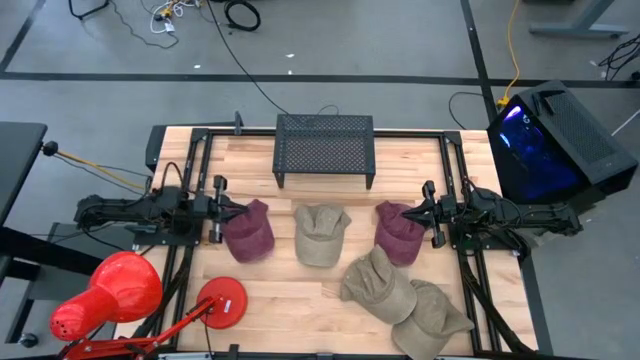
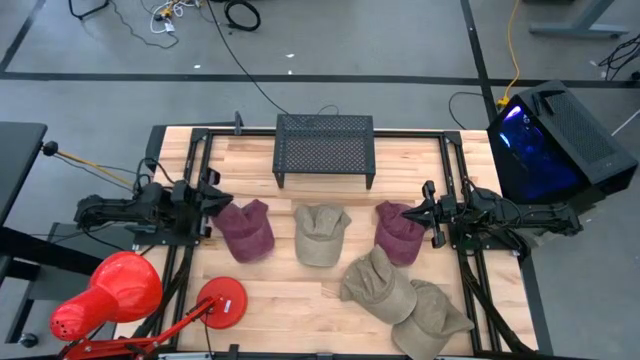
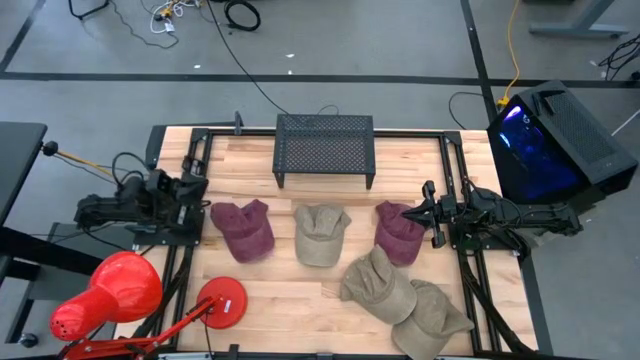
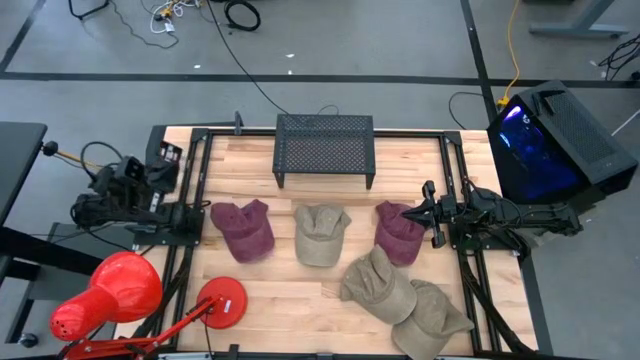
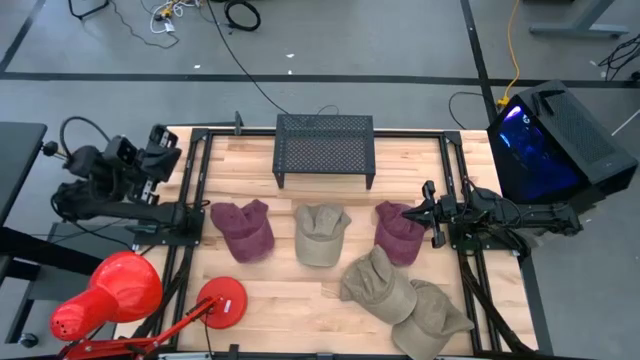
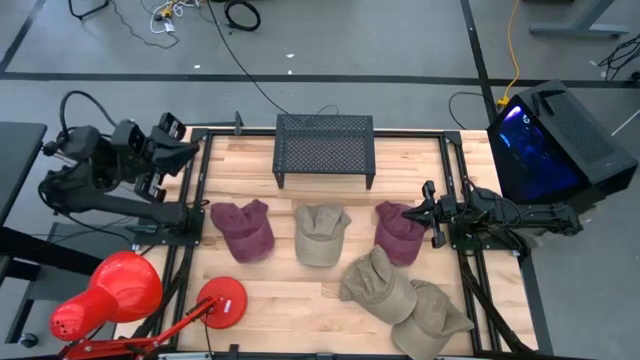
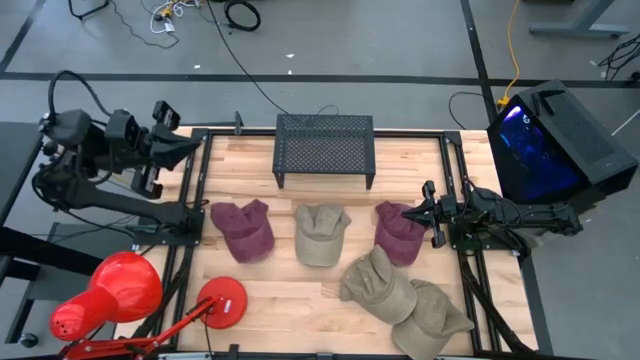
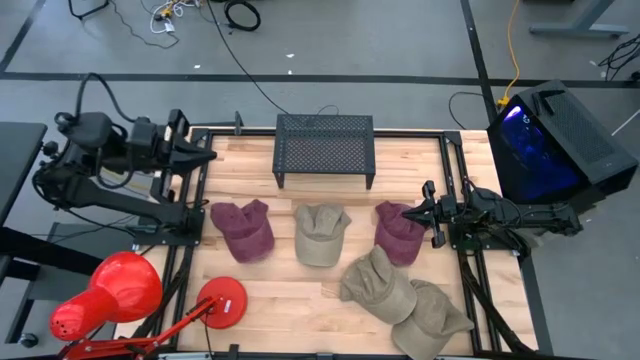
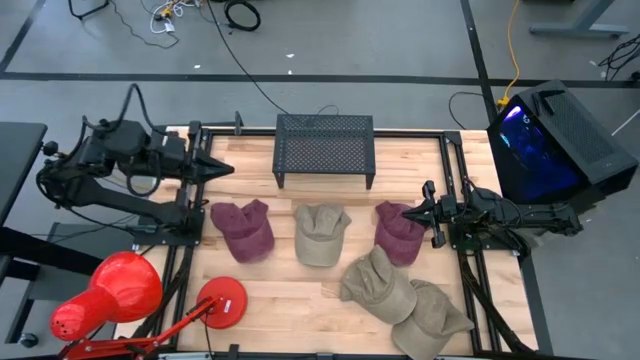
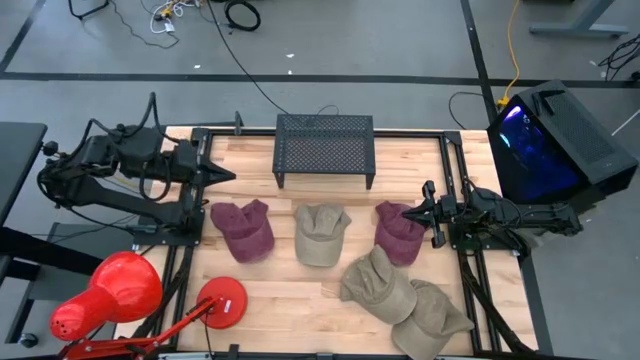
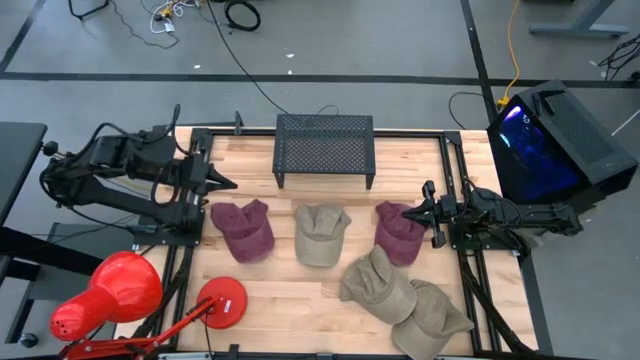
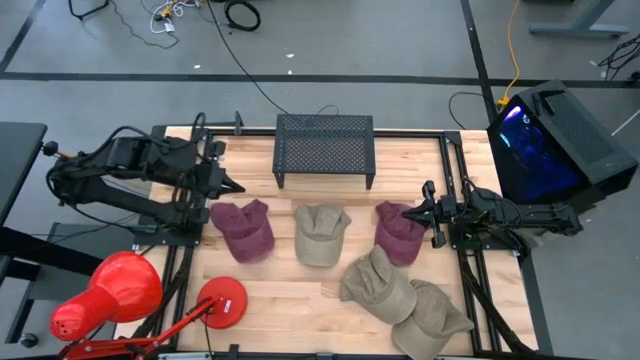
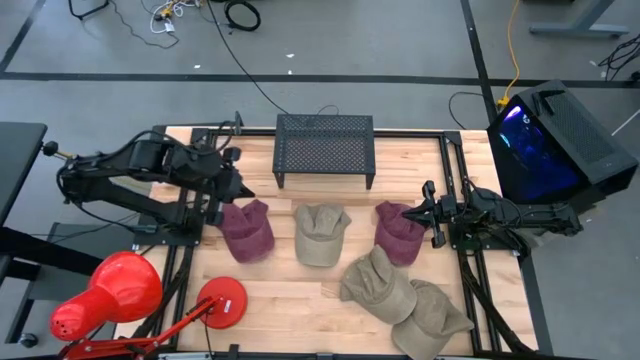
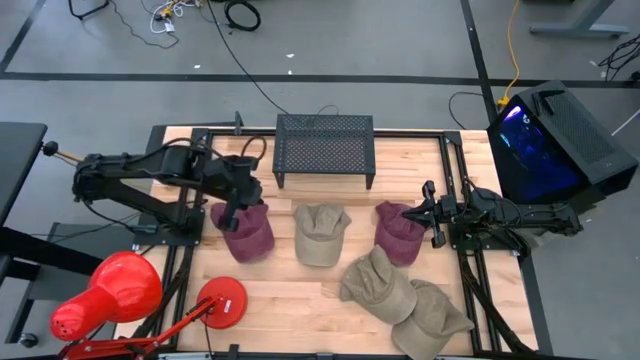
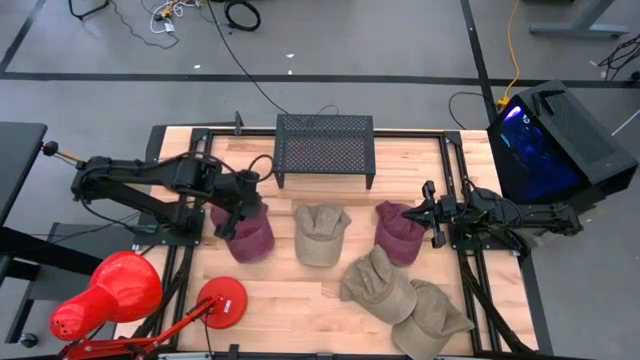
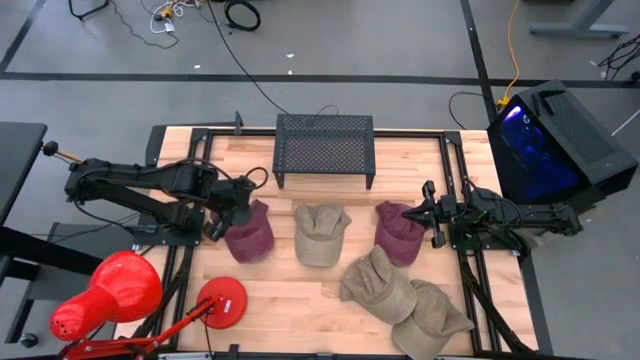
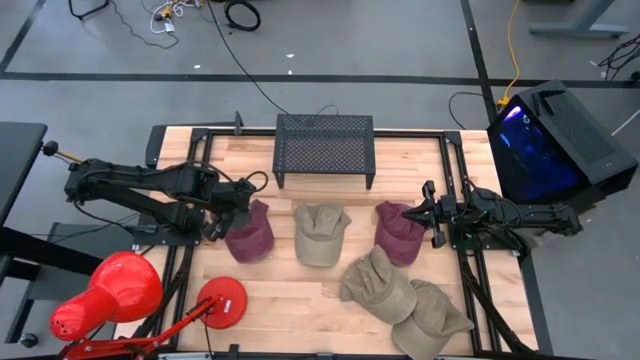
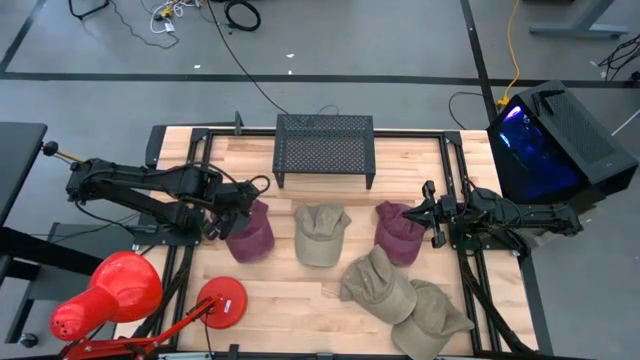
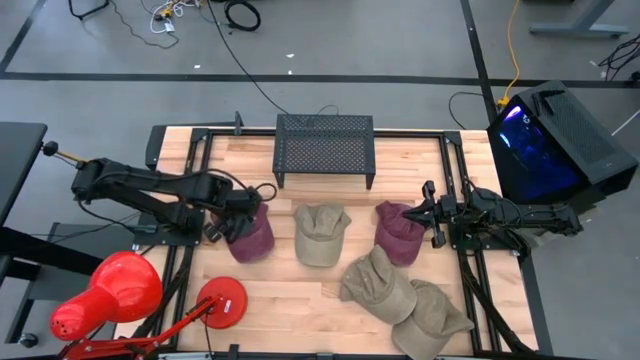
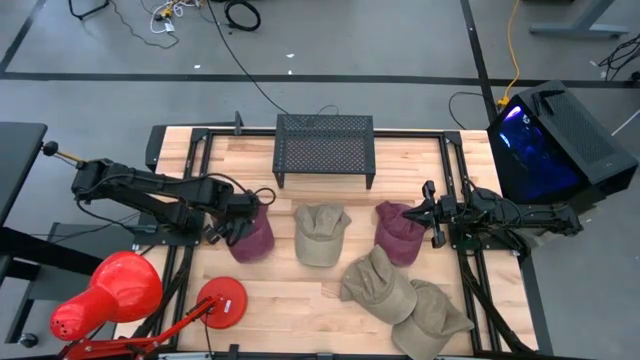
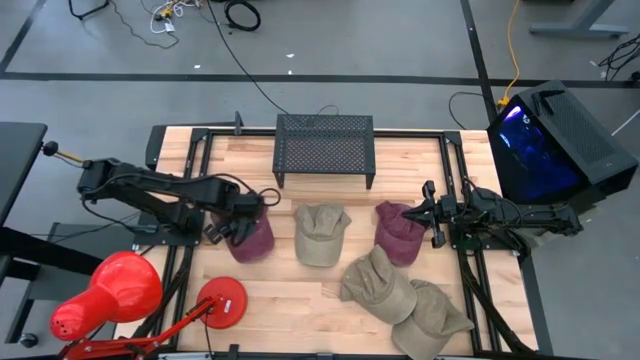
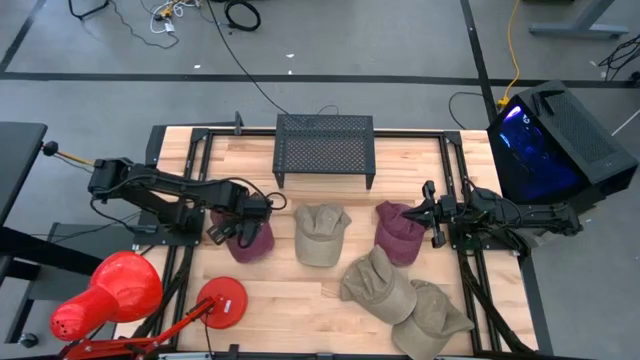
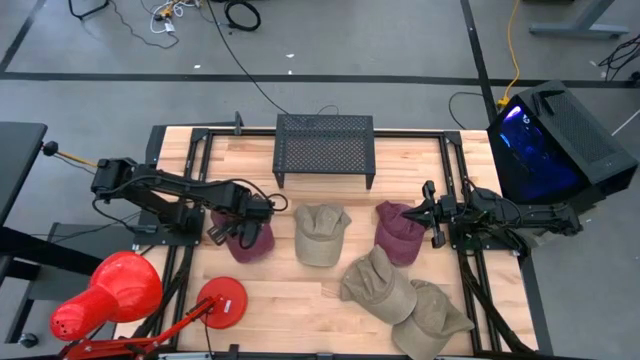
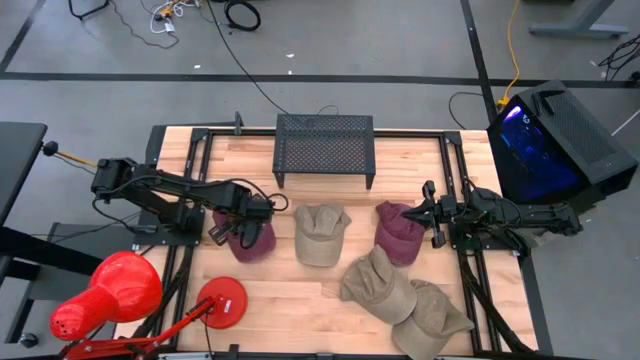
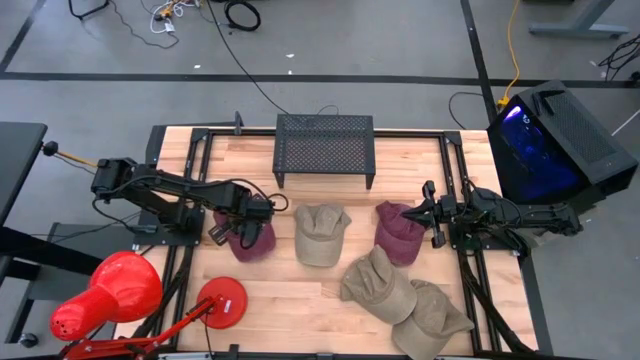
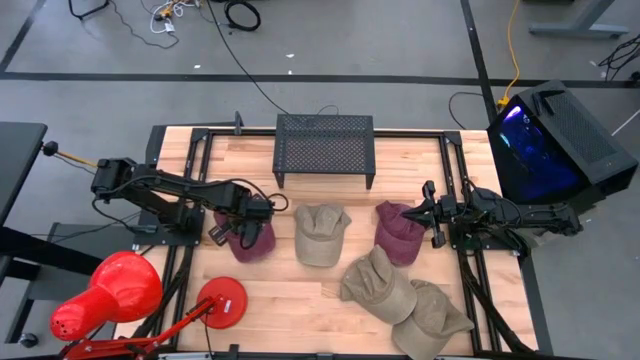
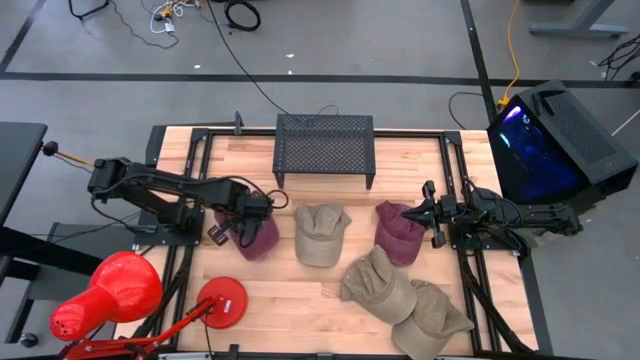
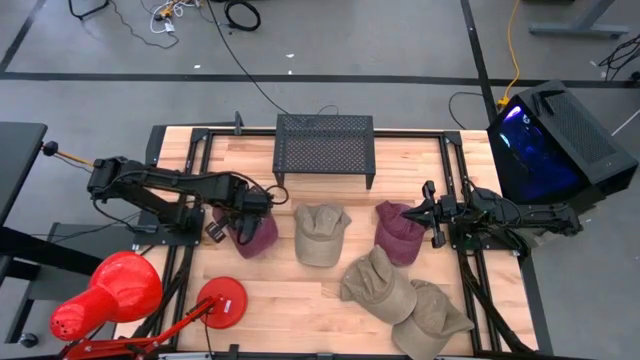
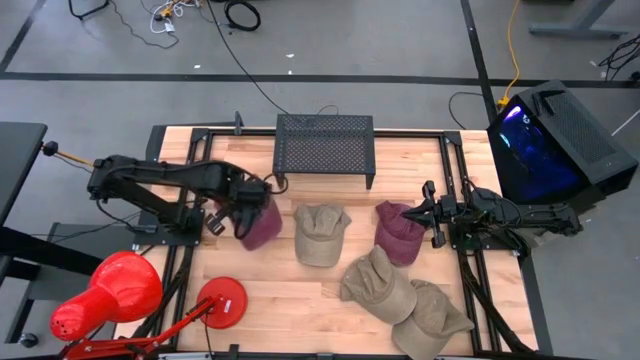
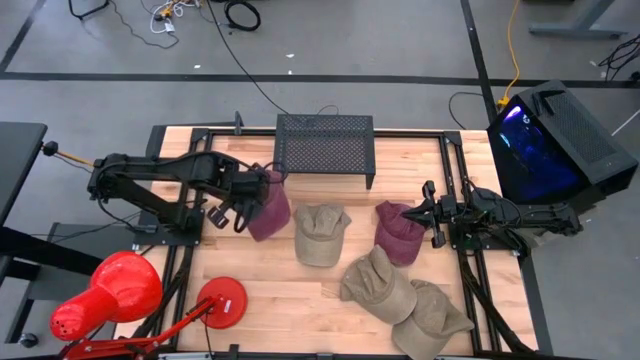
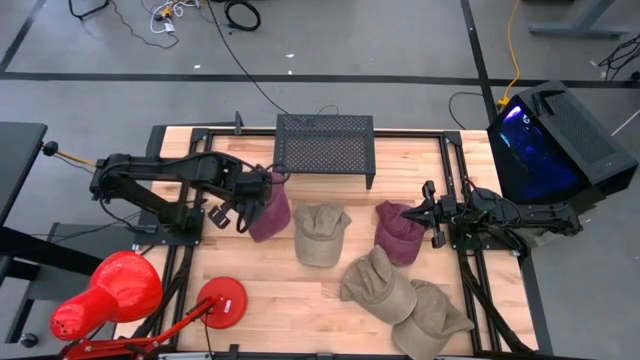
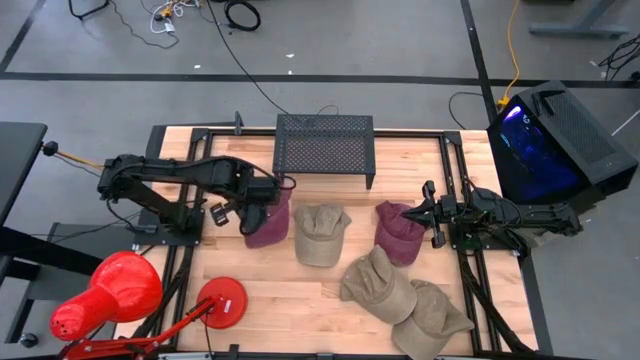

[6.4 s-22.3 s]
Task: Pick & Place hat
Put the left red cap on the shelf

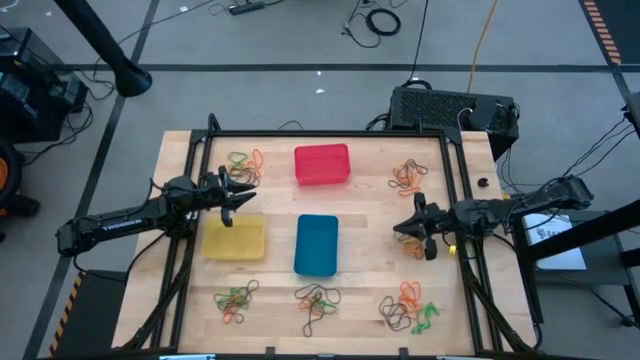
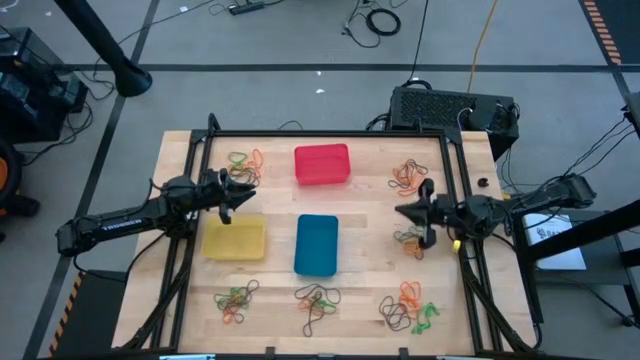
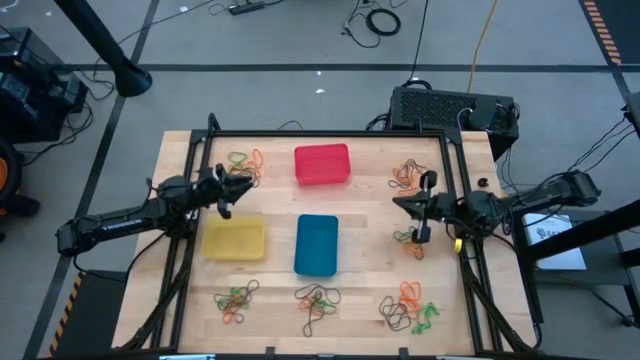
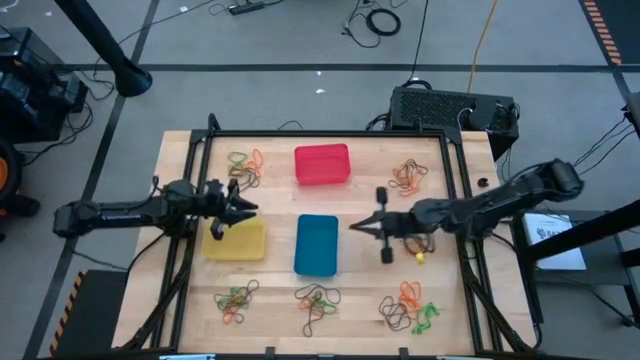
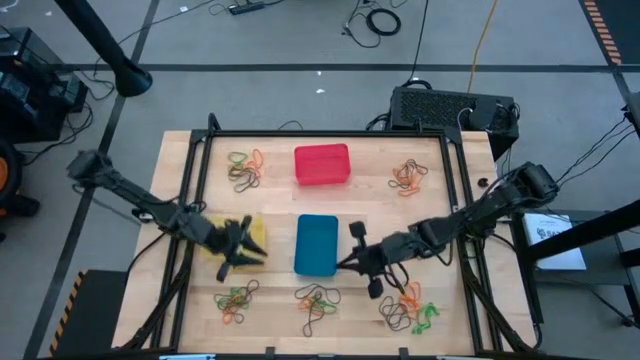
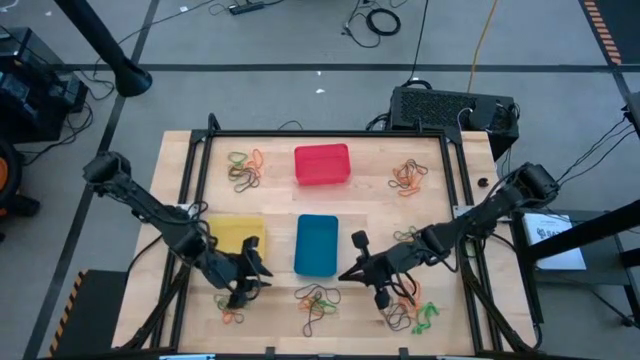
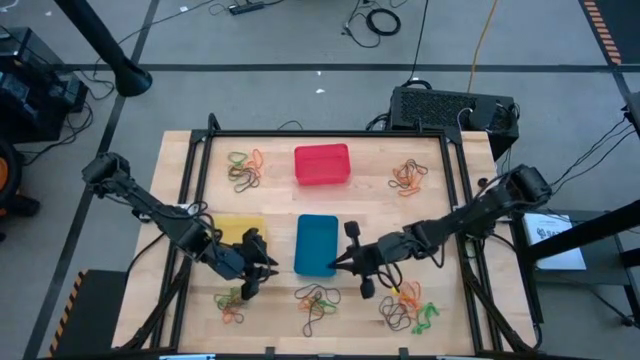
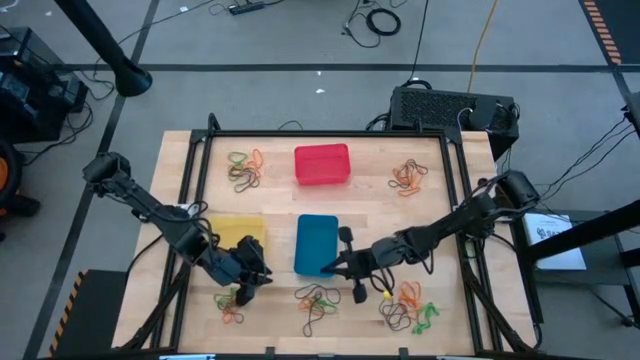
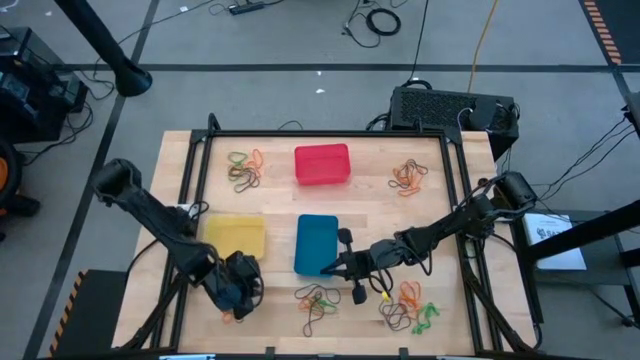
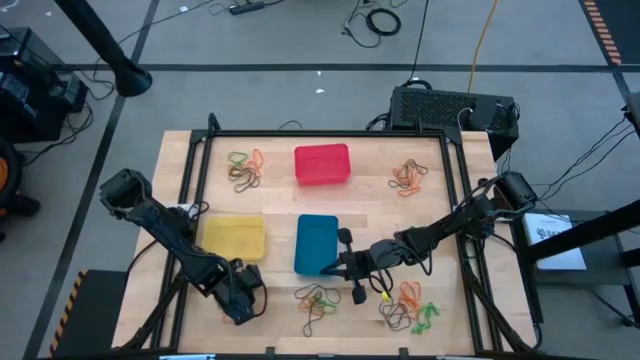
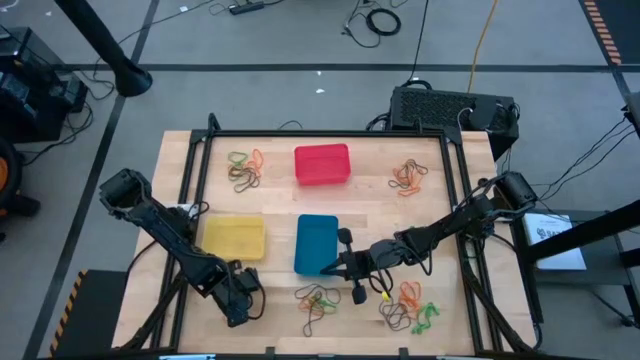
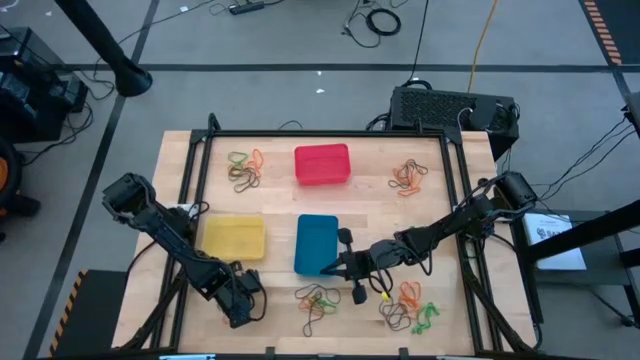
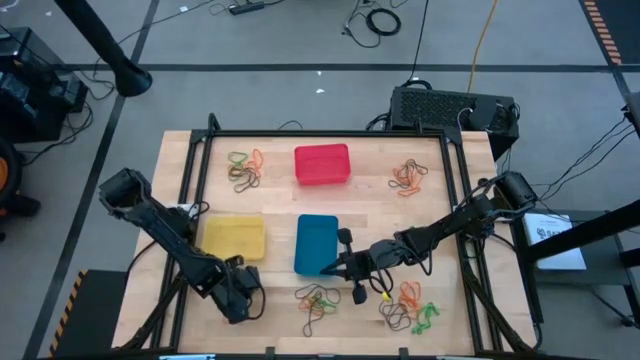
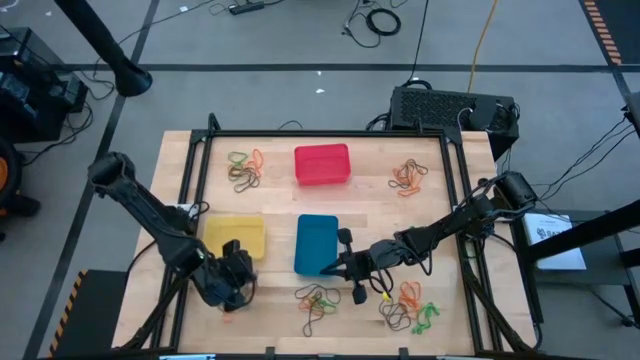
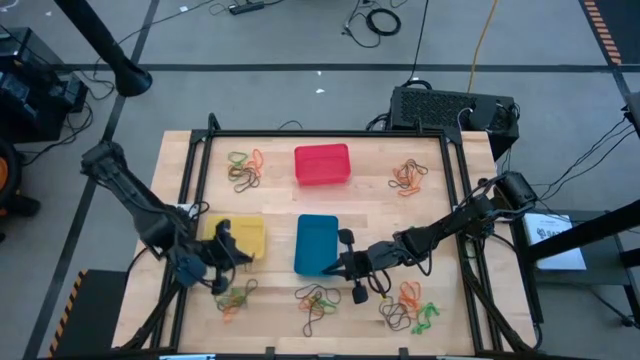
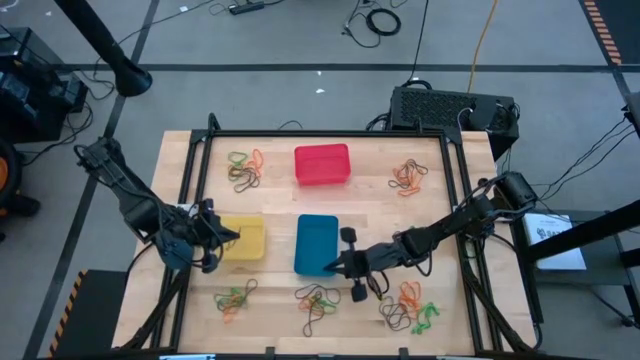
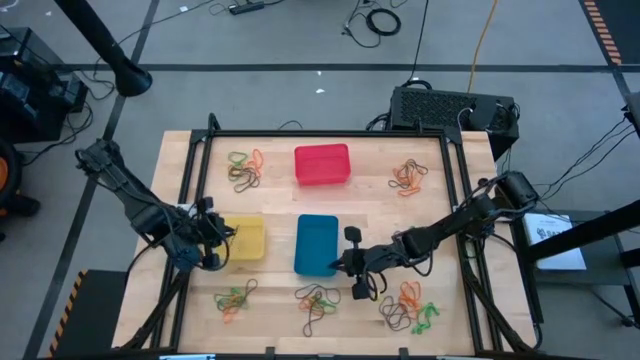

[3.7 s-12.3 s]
Task: Sort rubber bands into baskets
Put the purple rubber band into the yellow bin
